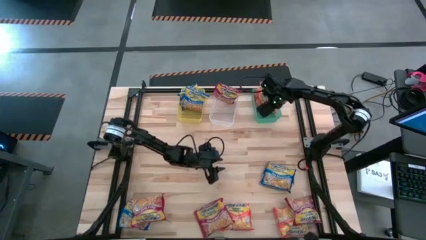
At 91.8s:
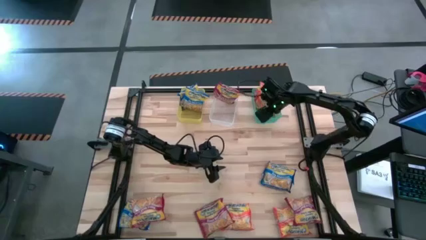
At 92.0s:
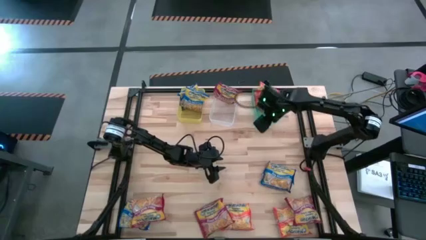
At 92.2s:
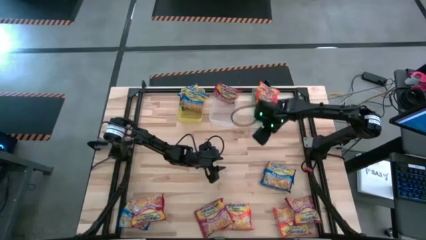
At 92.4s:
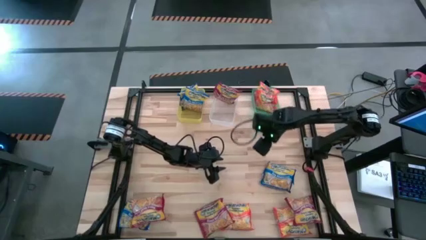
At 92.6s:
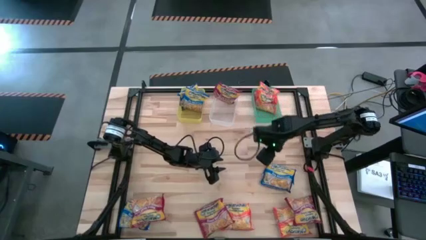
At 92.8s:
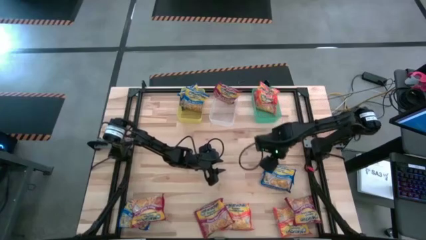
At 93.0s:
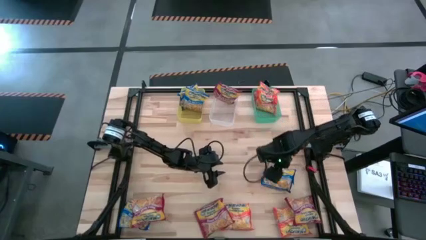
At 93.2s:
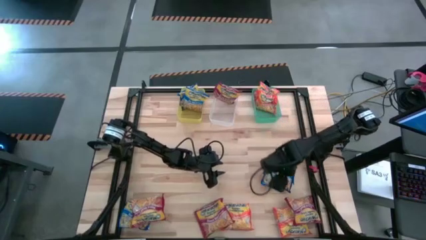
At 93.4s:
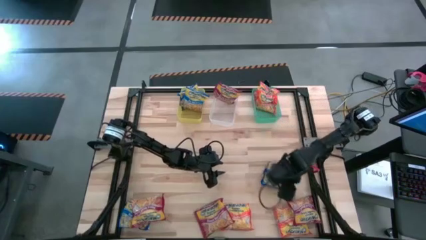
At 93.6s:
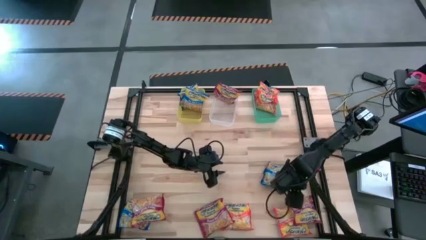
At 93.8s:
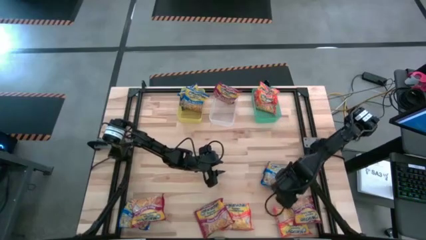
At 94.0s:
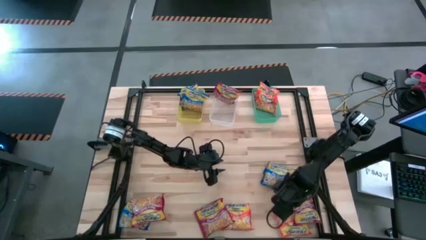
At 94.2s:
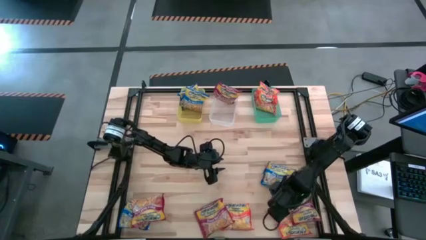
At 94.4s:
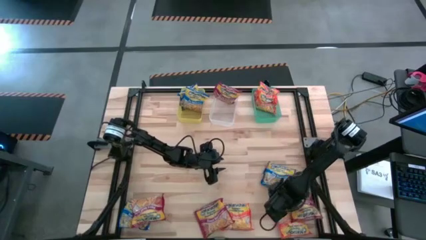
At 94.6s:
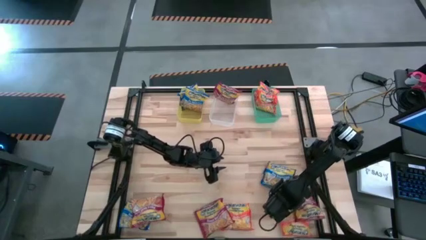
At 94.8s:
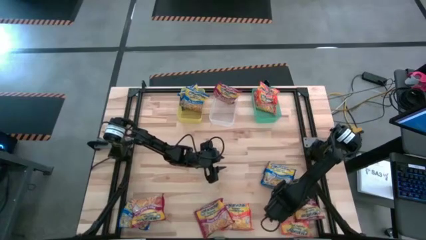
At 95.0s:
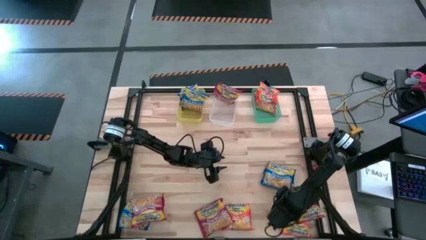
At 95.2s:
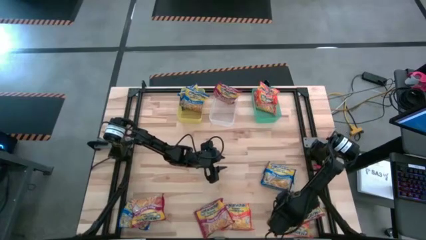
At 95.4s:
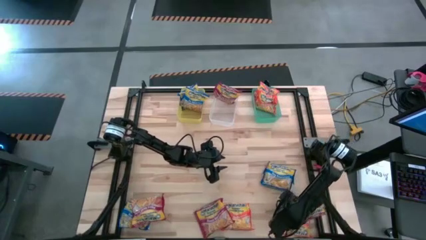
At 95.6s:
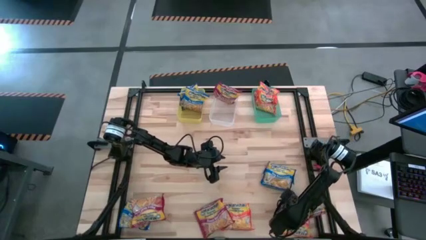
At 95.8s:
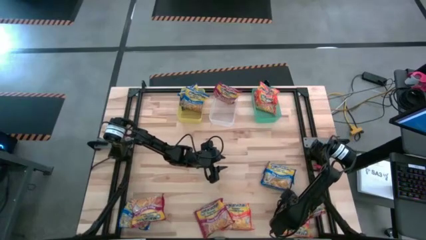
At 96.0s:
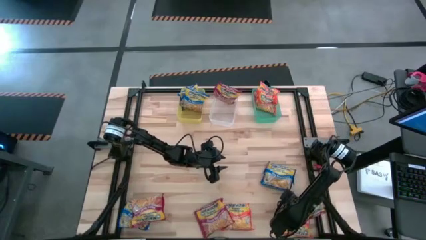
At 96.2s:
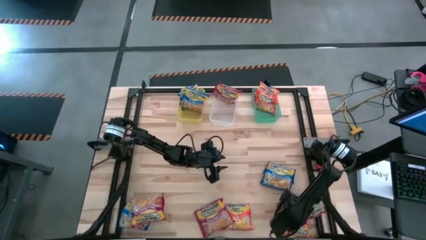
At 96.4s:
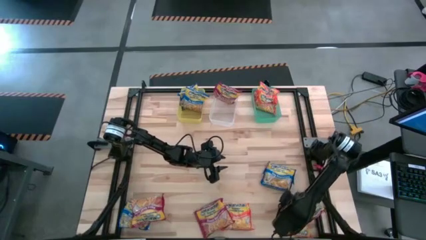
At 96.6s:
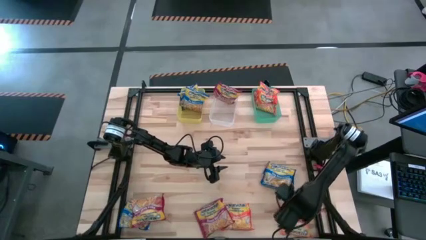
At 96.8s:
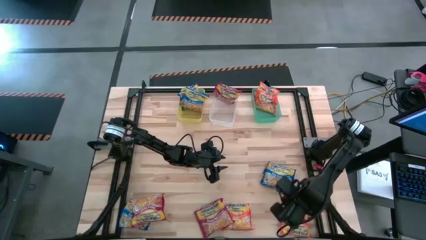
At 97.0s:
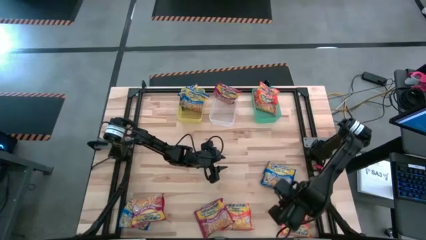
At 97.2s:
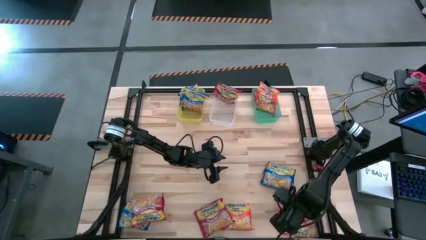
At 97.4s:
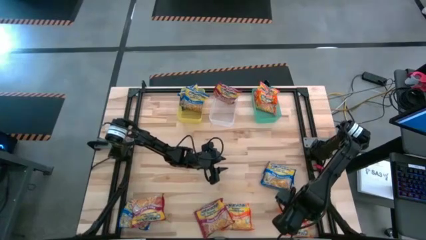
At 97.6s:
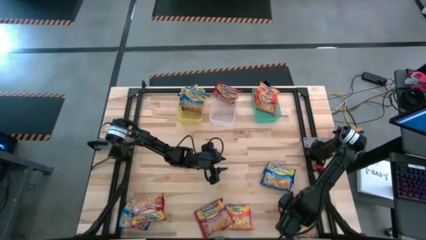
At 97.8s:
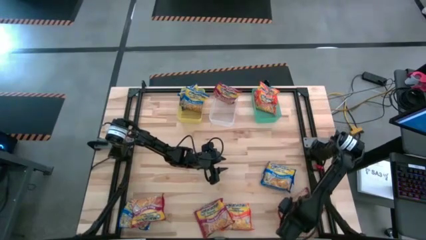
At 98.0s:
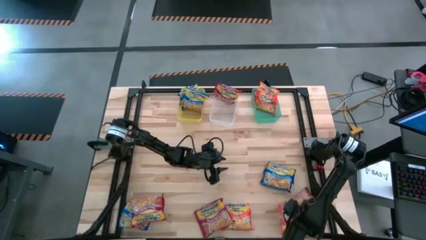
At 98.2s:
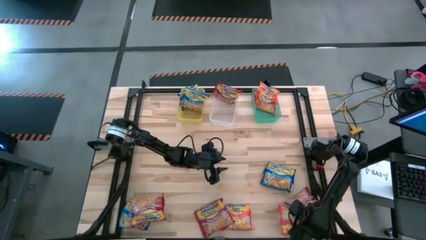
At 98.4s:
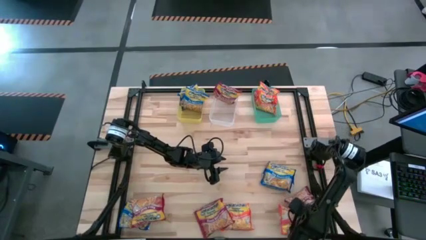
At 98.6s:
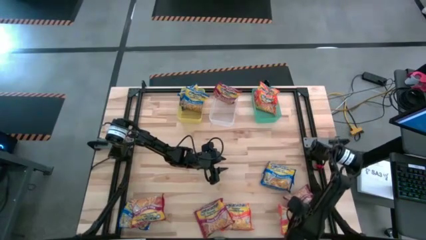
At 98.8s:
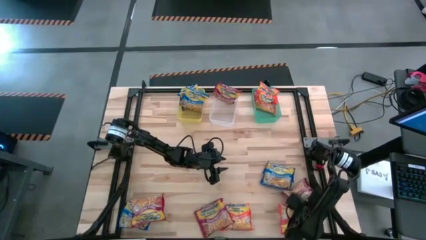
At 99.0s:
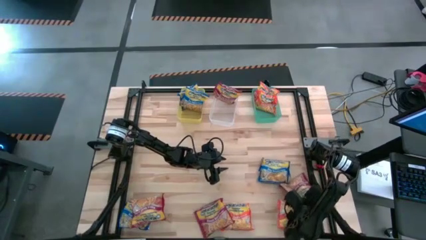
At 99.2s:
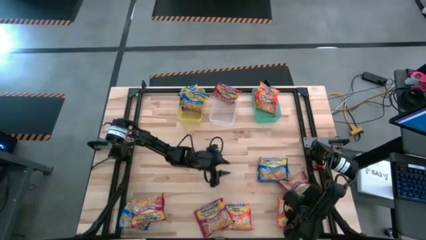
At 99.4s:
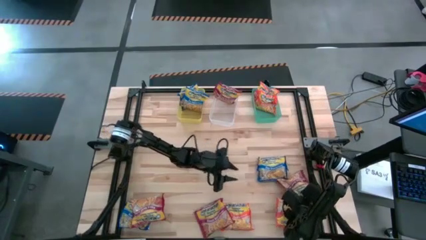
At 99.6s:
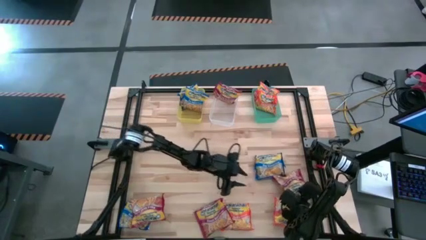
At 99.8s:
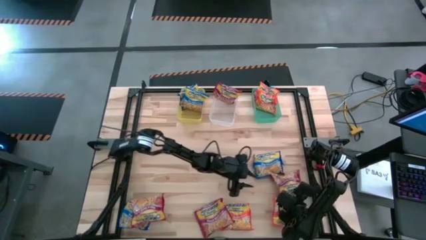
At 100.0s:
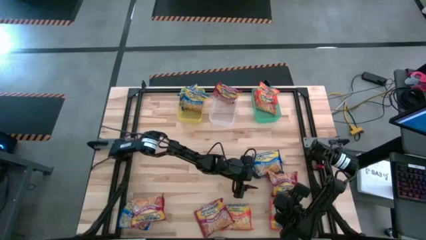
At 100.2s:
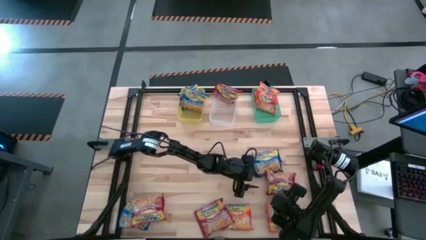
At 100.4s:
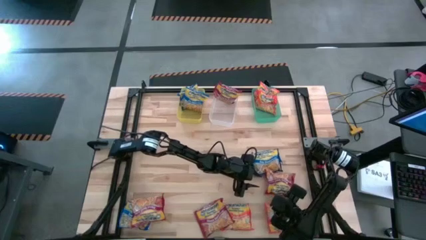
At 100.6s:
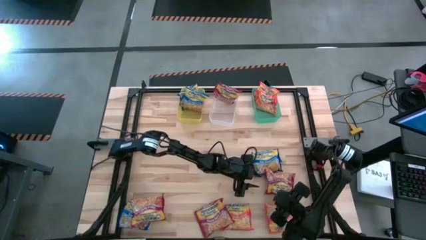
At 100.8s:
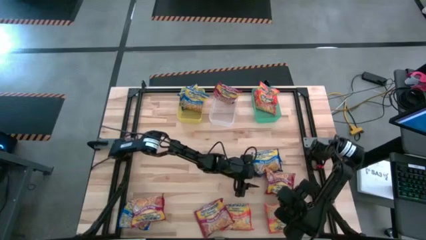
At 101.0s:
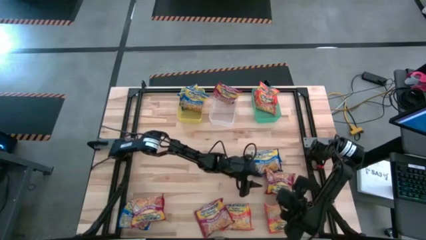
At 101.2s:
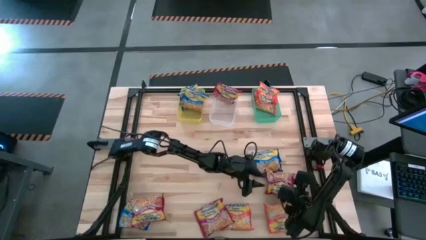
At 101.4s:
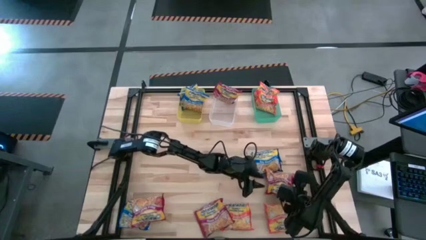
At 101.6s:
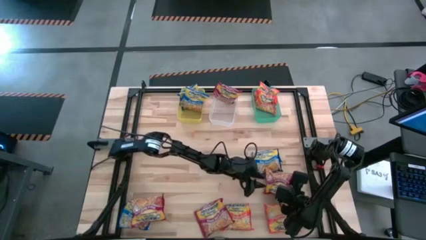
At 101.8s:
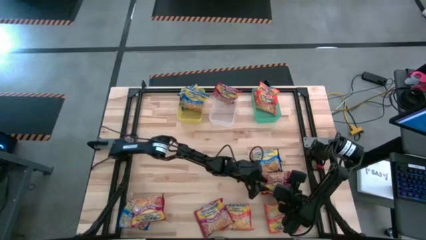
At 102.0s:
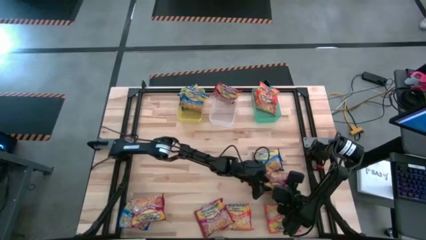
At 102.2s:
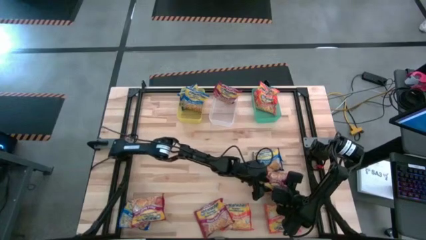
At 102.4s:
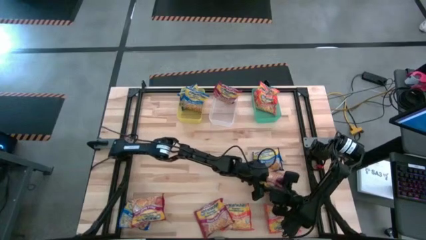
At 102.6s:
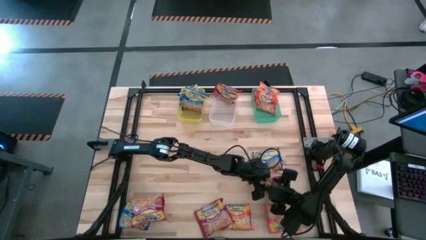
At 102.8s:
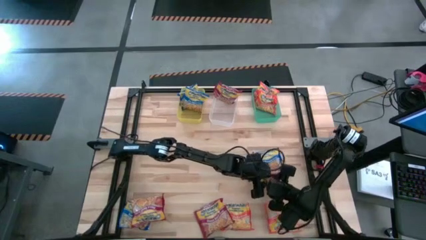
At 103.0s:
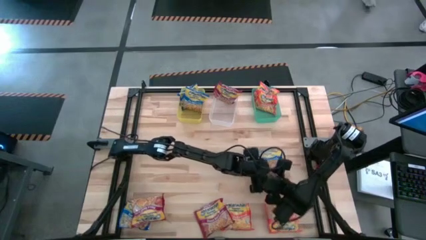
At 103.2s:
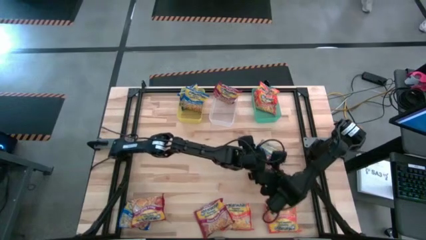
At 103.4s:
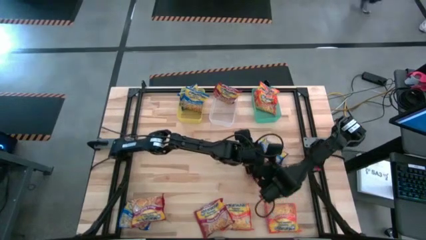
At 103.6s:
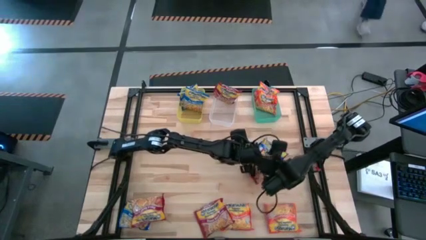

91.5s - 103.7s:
Task: Sort Maruchan noodles
Put the right red noodle pack into the white bin

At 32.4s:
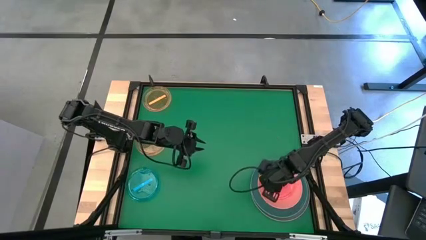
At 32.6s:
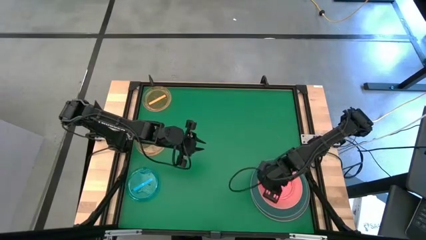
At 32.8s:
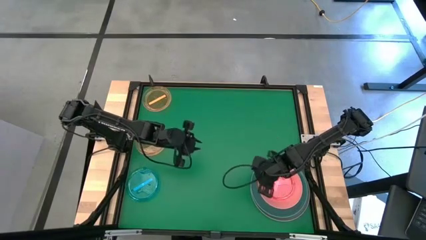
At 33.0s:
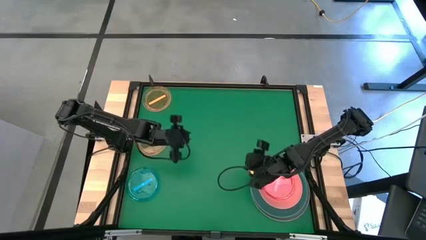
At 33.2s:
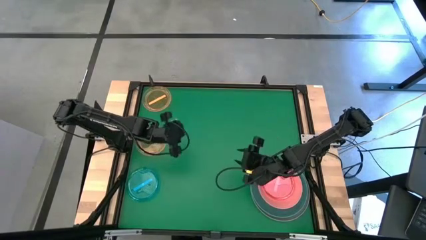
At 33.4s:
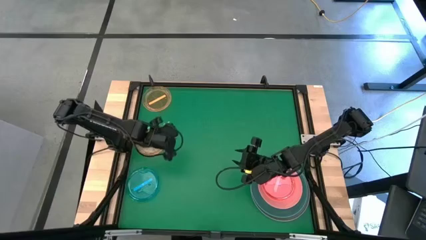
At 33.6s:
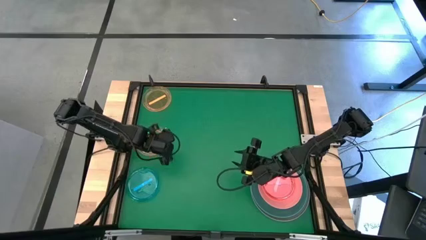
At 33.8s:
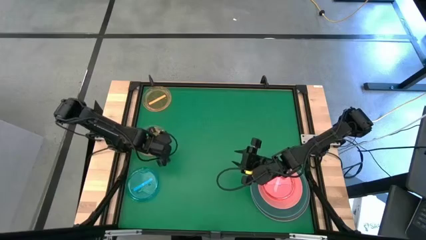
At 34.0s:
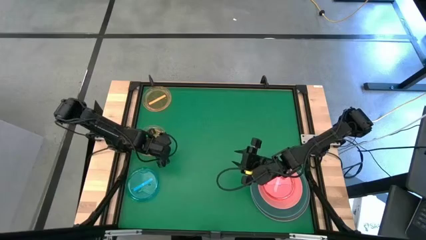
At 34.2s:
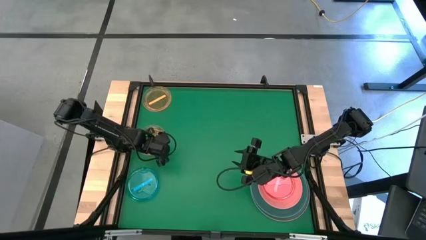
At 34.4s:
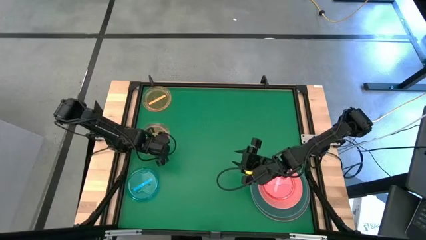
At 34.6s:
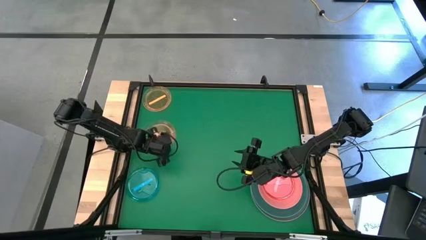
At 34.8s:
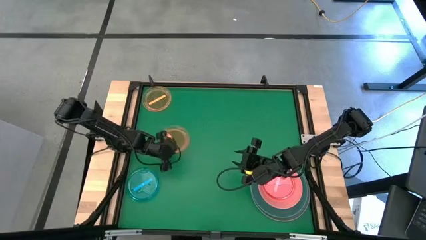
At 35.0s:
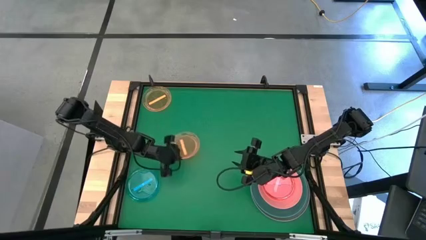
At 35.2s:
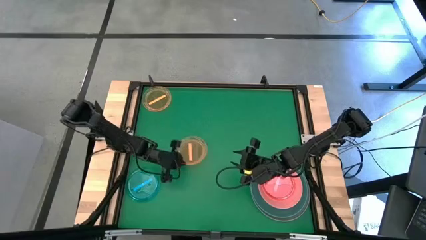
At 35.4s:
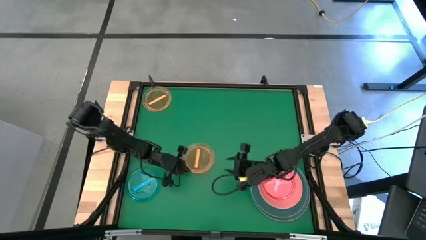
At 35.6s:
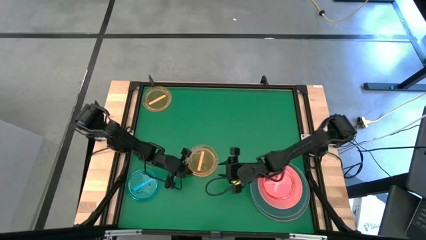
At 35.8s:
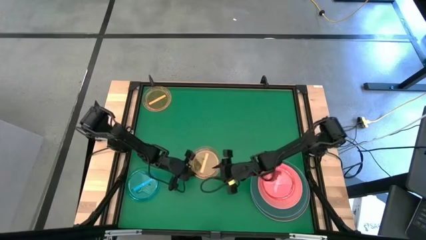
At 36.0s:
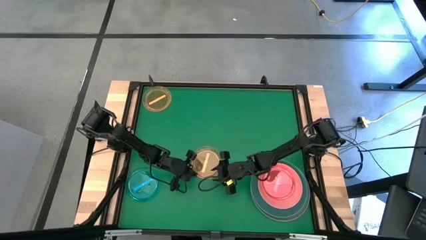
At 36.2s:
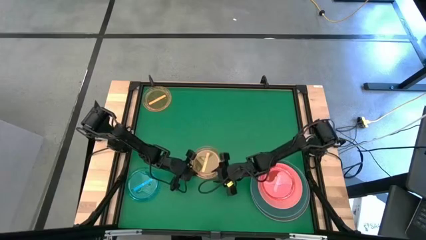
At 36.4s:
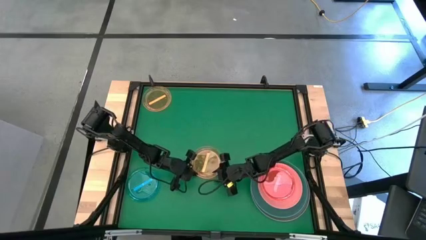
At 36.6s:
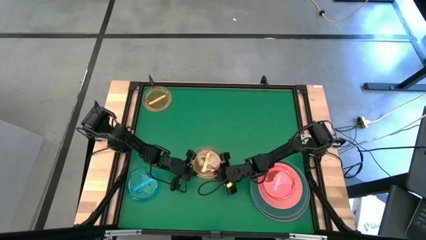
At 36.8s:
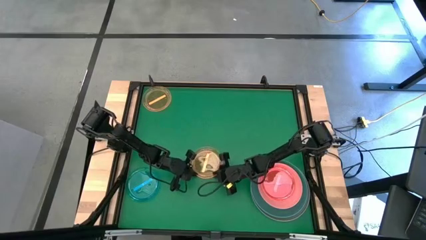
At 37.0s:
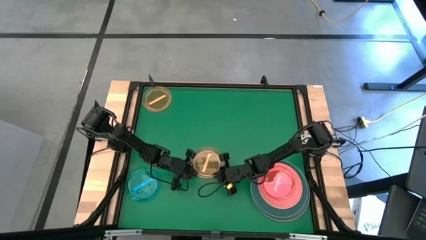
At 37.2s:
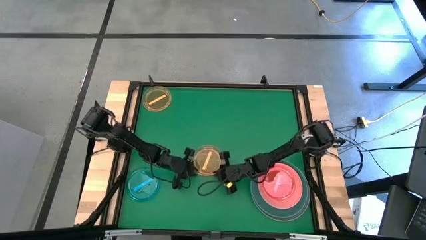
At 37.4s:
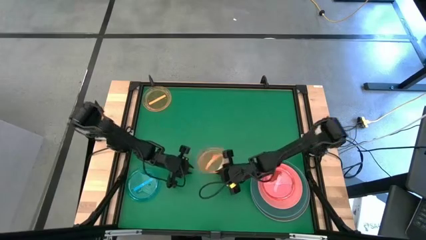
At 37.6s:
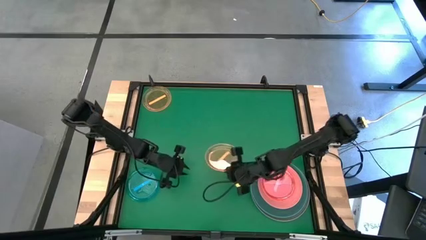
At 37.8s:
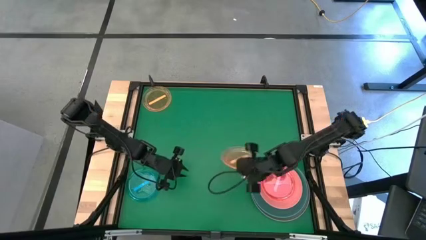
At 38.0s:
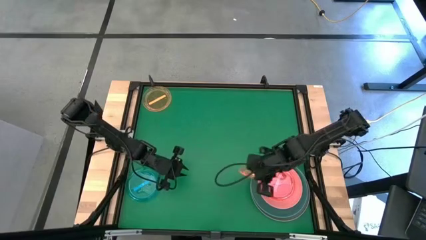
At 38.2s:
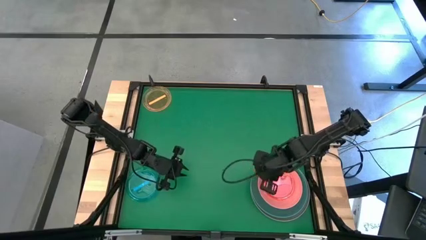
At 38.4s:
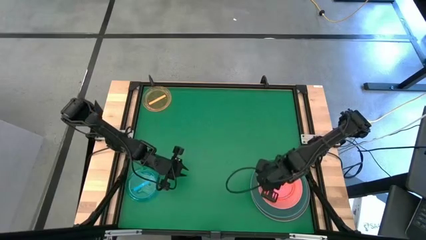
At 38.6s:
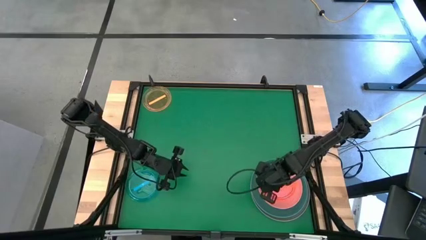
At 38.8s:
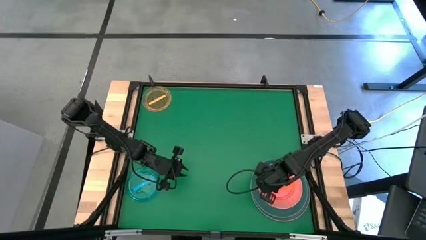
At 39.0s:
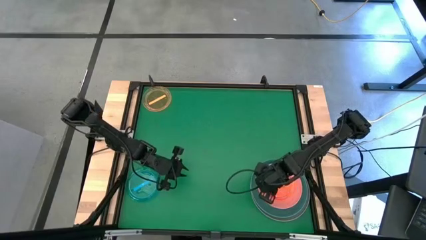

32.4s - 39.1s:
Task: Stack plastic plates
Stack the bottom light orange plate on top of the light red plate
